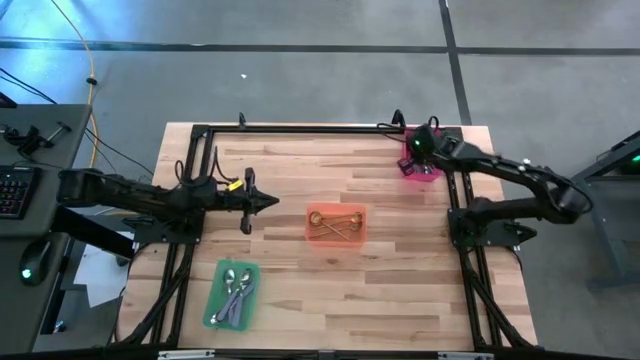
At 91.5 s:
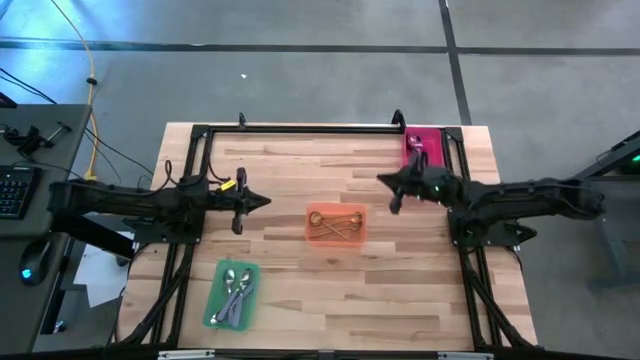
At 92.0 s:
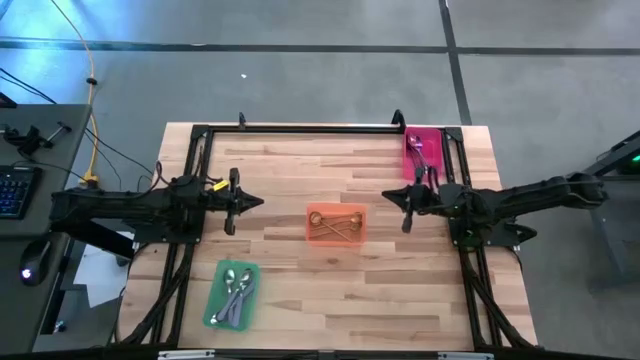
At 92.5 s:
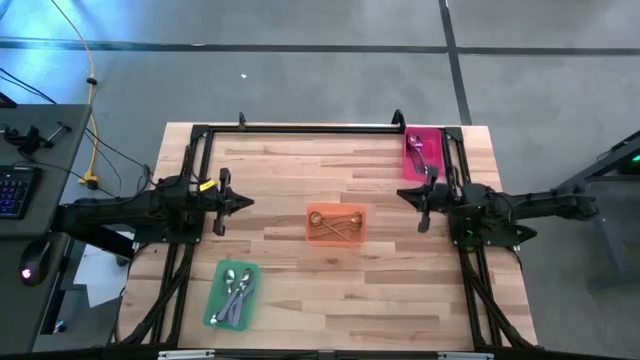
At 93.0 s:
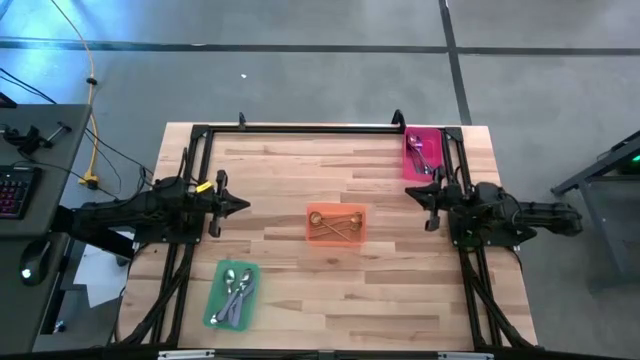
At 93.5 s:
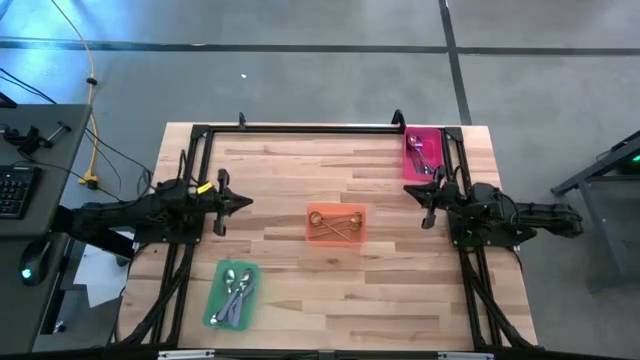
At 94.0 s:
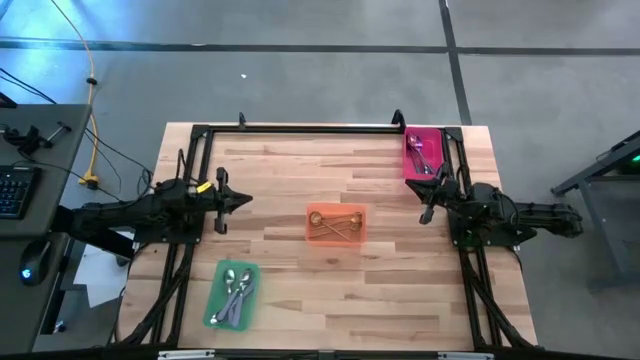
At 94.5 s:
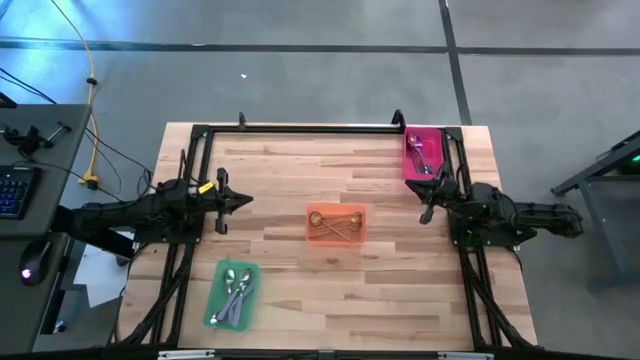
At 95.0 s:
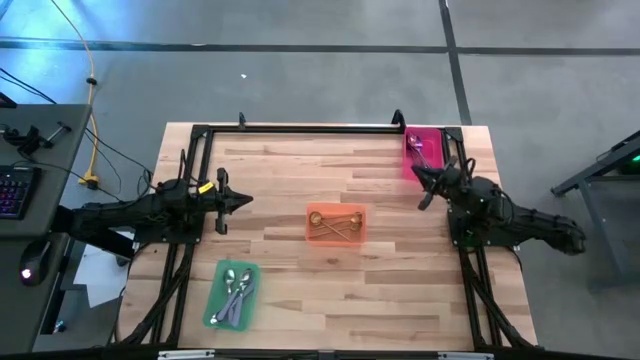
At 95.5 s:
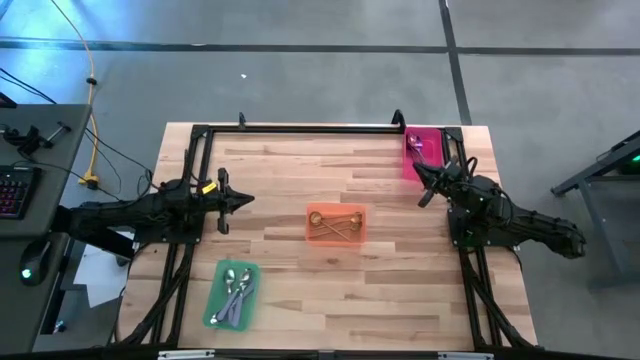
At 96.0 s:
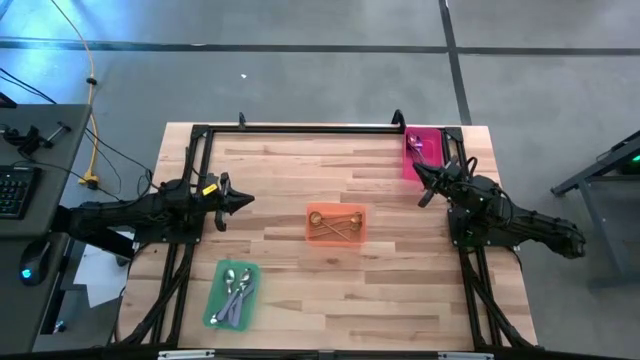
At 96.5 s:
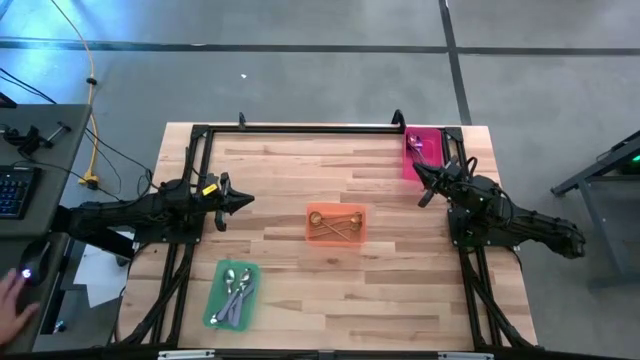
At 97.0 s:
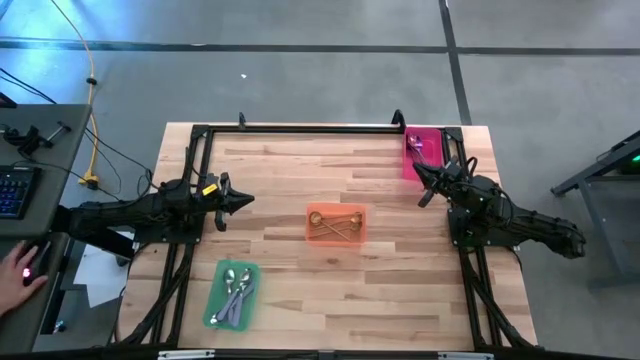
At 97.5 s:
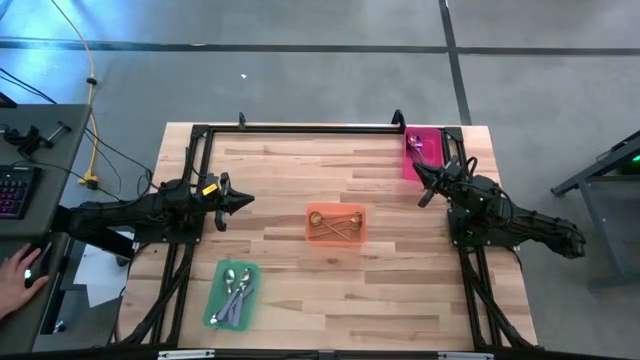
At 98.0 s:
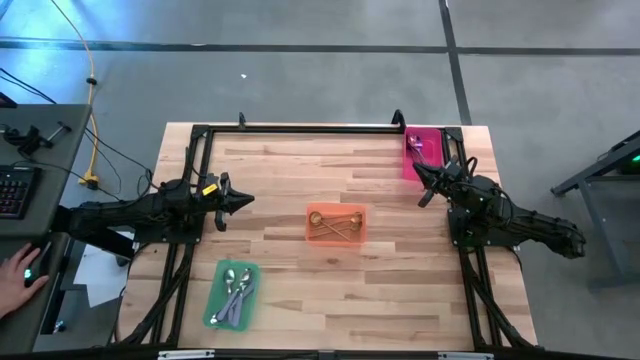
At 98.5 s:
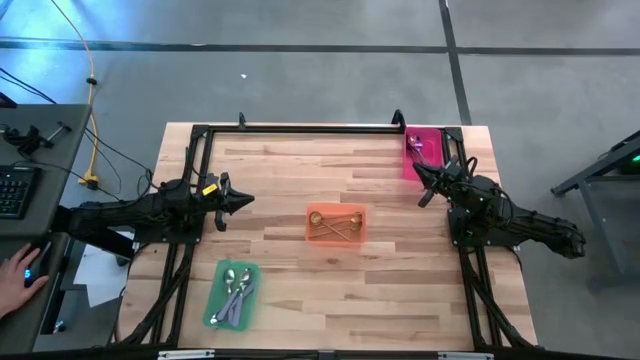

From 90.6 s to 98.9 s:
Task: Sort silverware by color (type)
Return to Home Position

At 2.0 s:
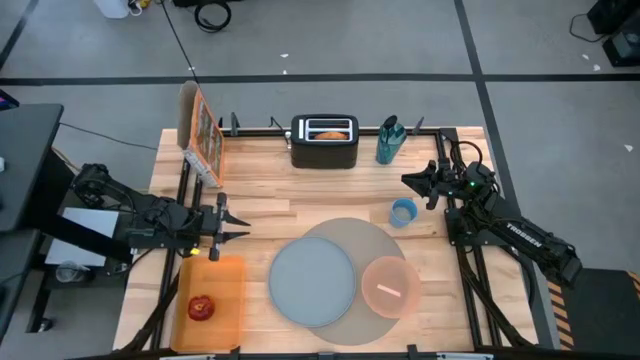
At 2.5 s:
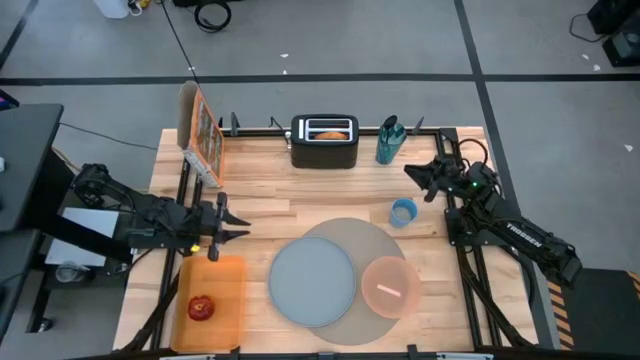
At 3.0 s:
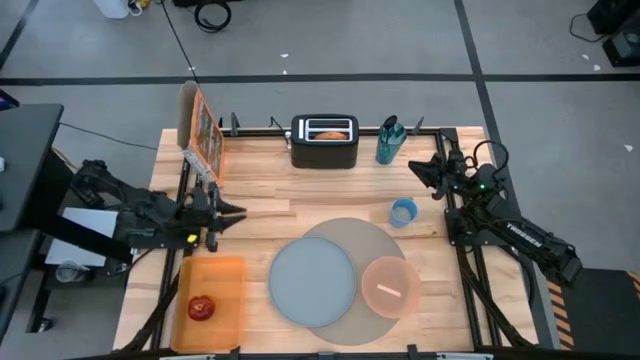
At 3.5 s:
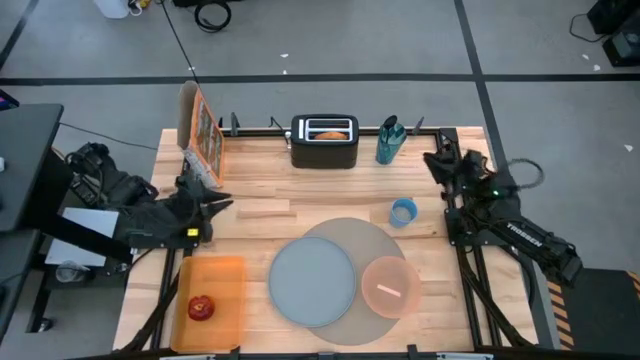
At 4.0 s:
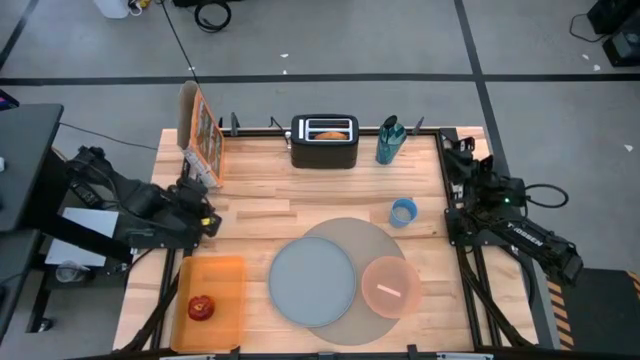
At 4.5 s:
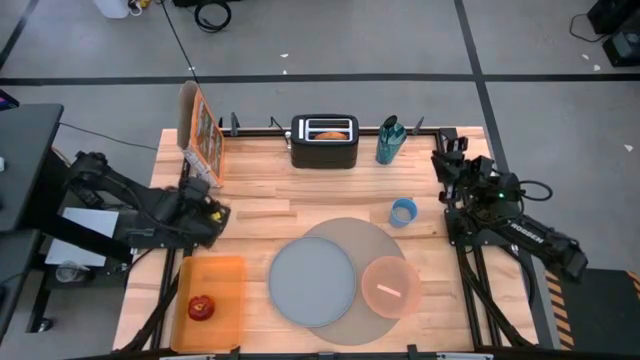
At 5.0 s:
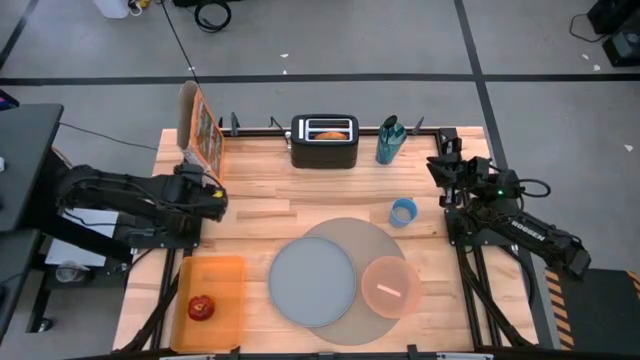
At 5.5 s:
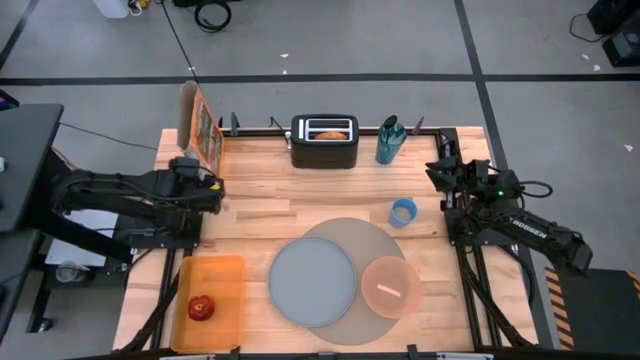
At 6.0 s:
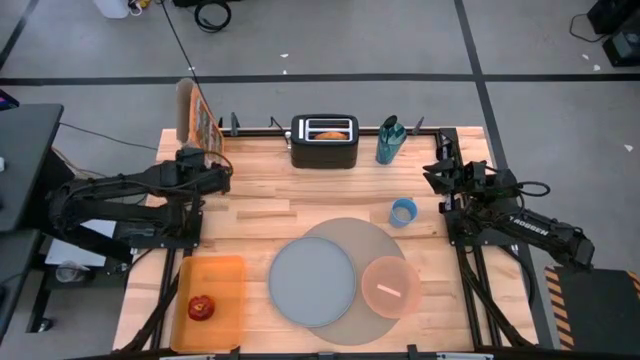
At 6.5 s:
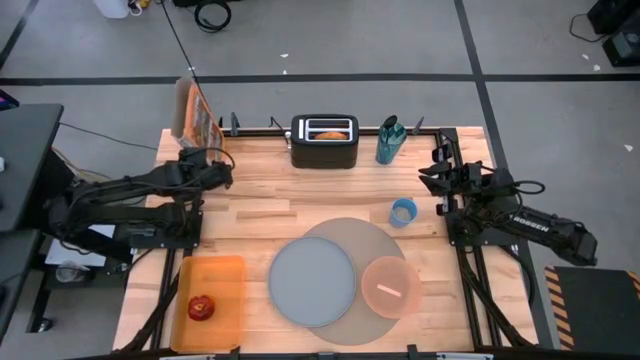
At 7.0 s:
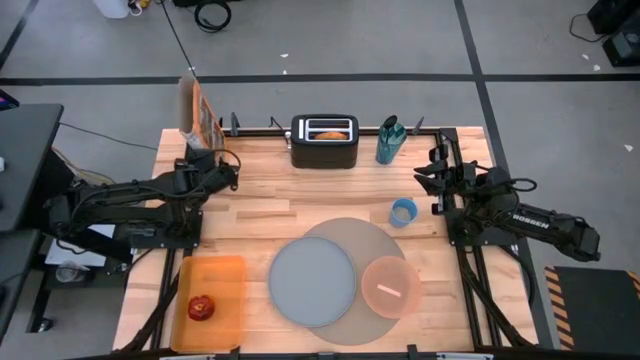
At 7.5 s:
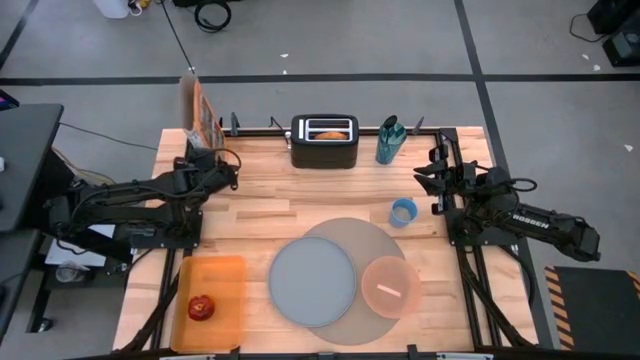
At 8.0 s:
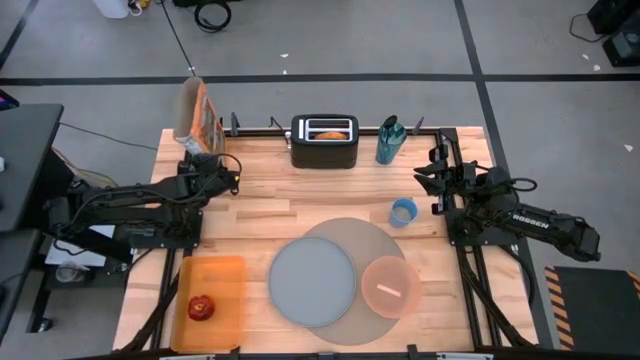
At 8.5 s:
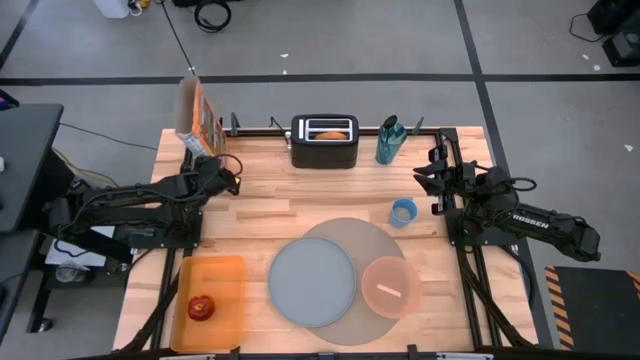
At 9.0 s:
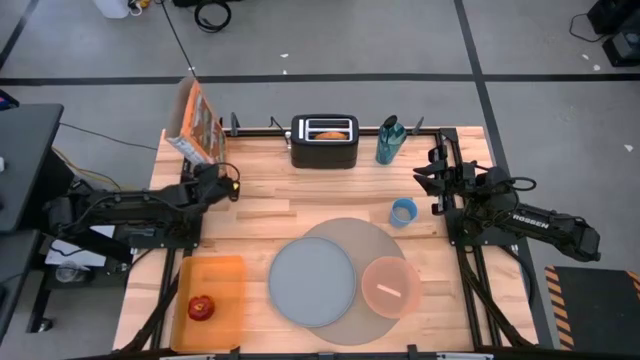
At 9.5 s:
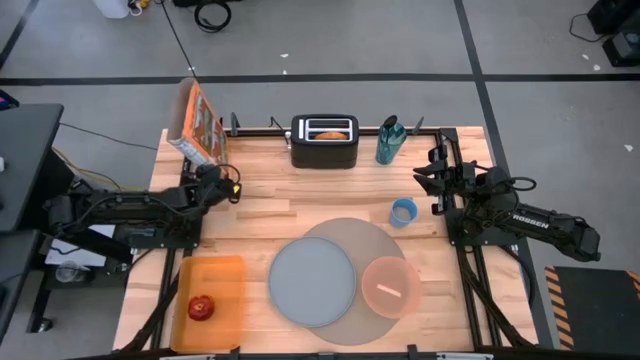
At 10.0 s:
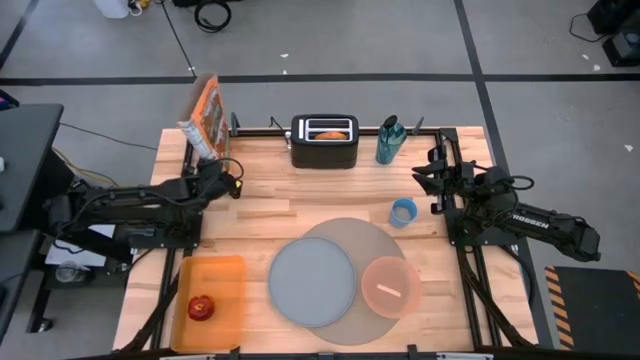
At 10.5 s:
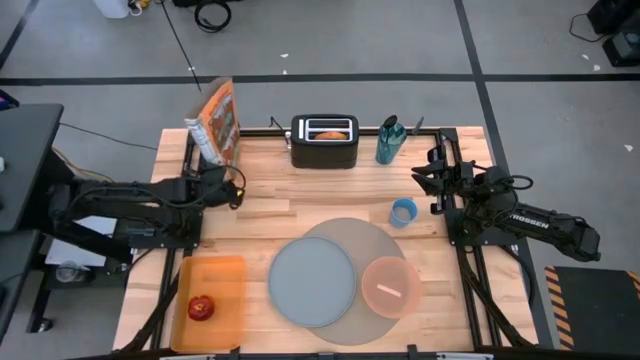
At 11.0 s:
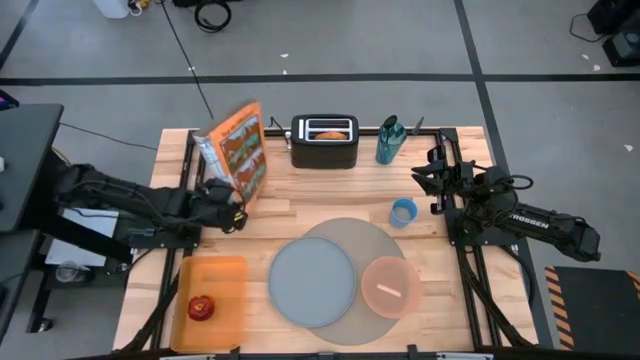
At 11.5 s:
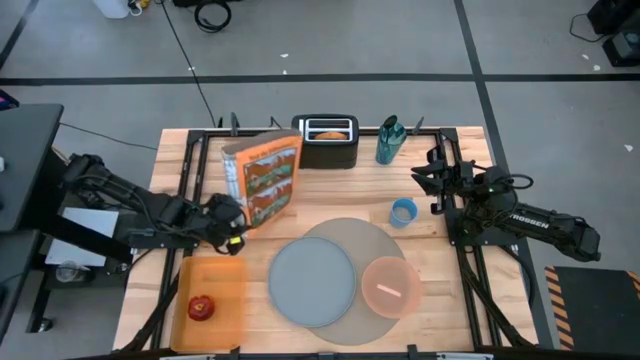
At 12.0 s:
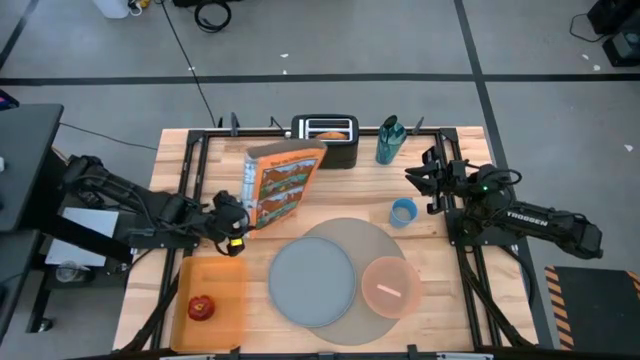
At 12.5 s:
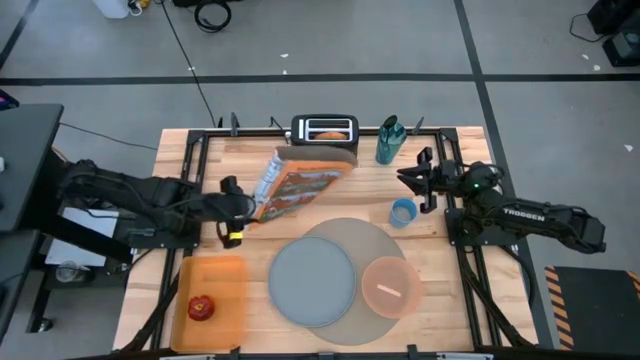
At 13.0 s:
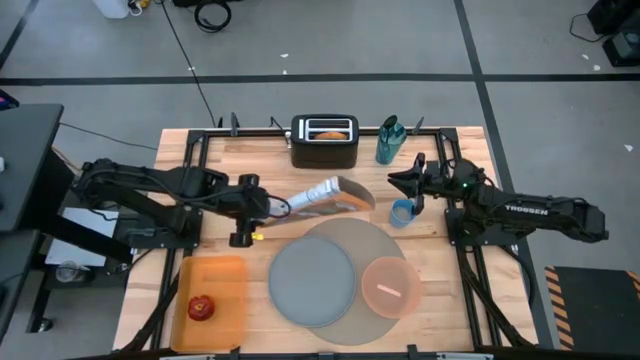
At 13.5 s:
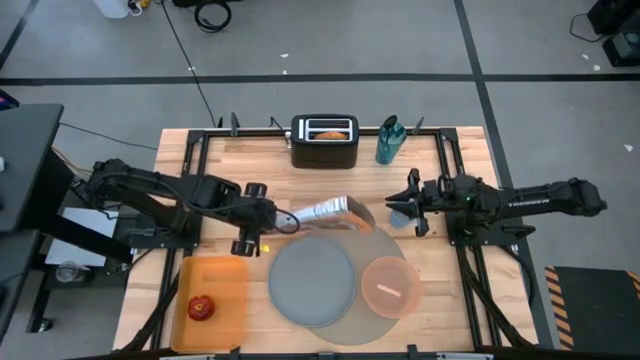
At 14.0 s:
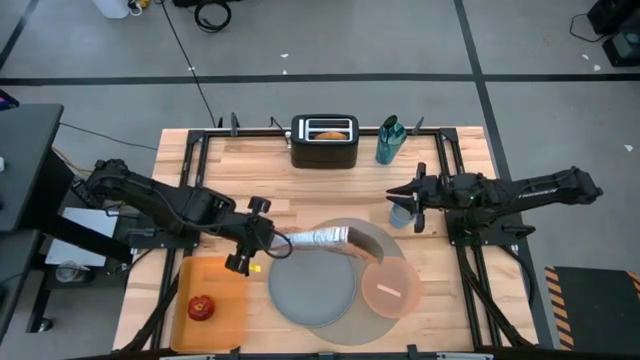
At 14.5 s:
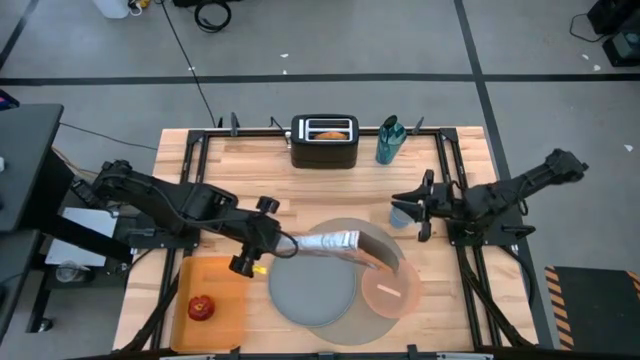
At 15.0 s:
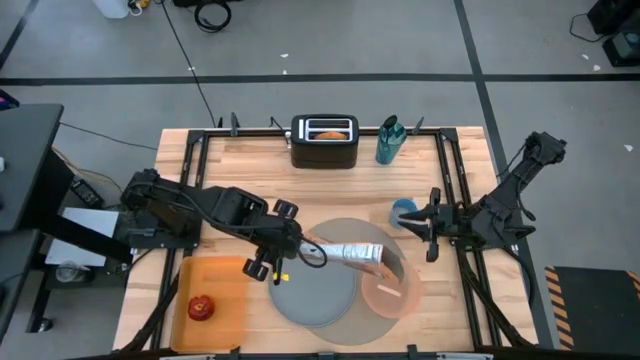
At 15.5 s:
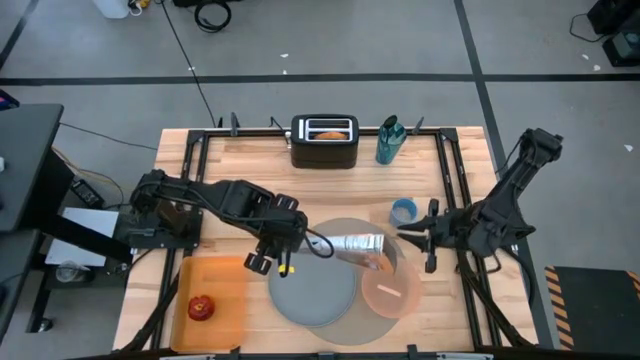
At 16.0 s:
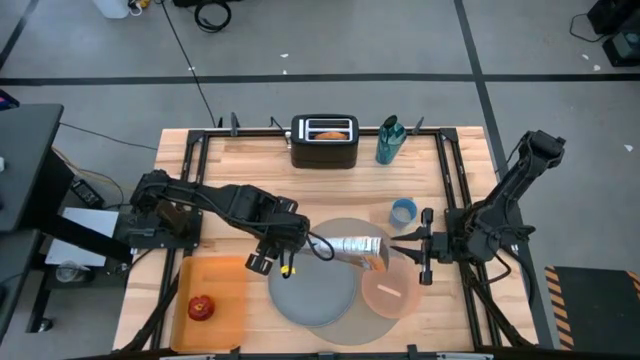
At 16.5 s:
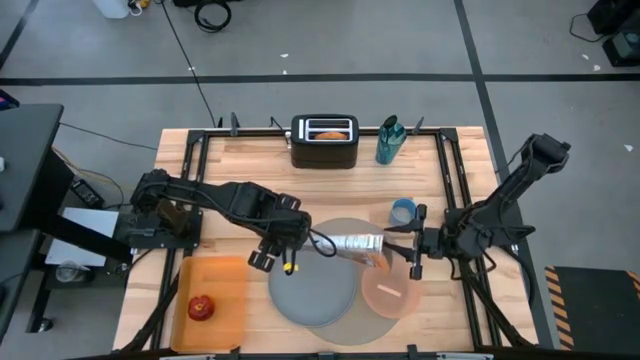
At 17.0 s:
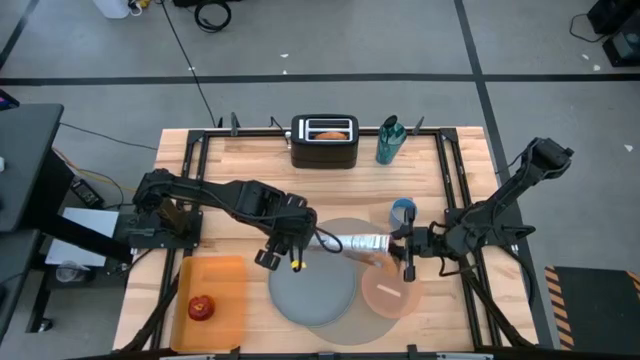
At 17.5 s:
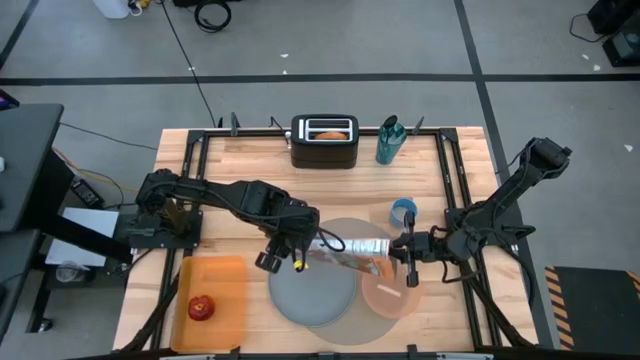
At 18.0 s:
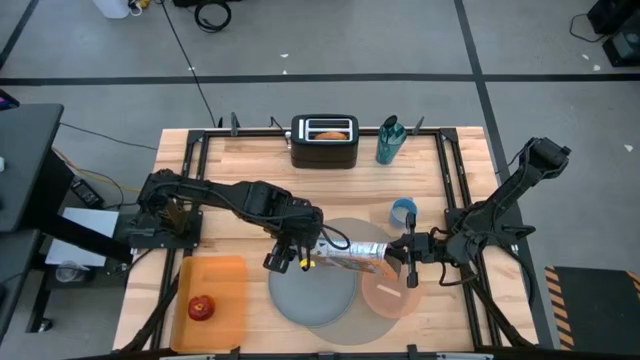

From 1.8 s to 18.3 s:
Task: Arrange a breakfast setting
Pour the cereal from the yellow cereal box into the orange bowl on the brown placemat
